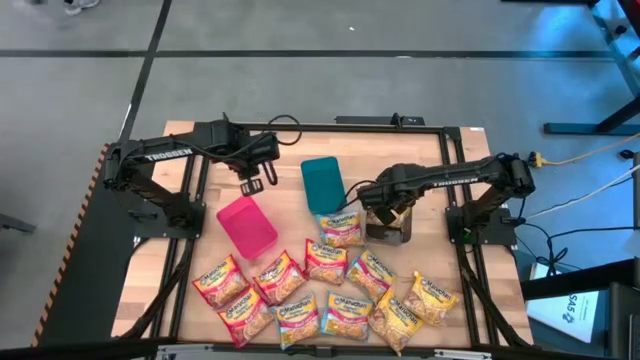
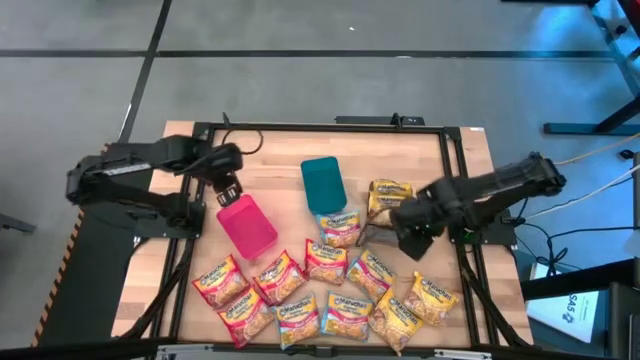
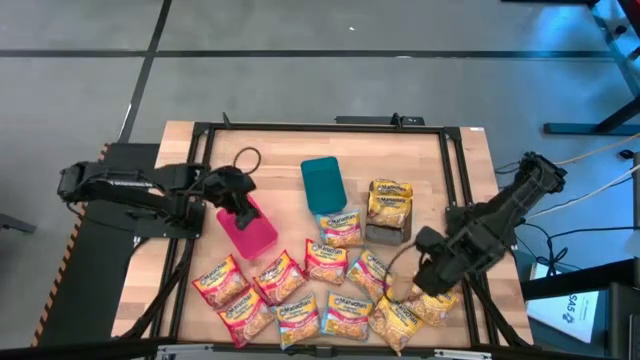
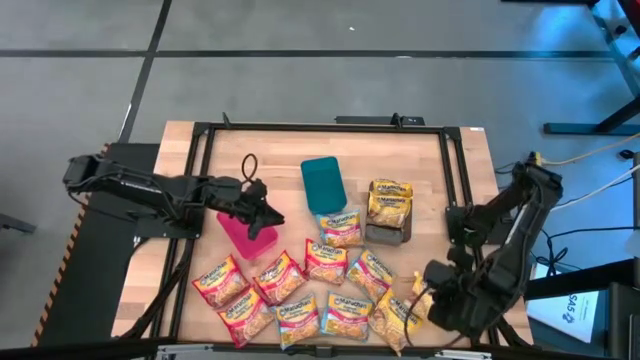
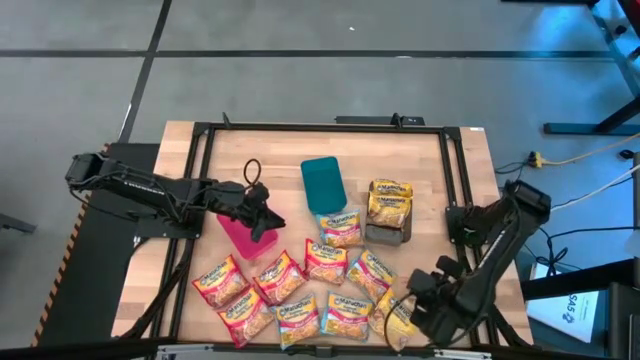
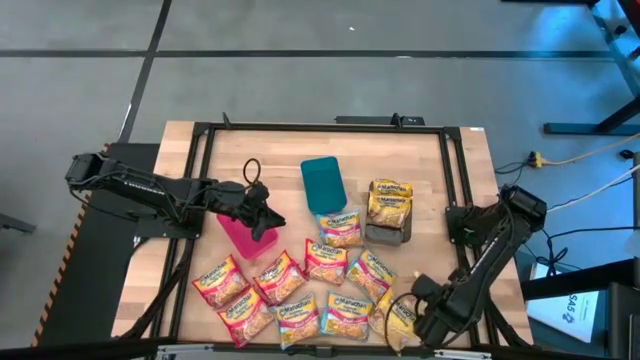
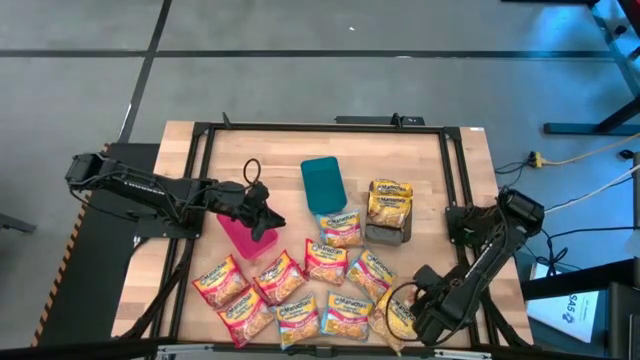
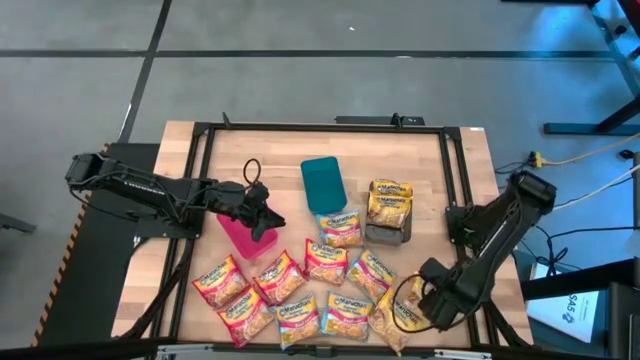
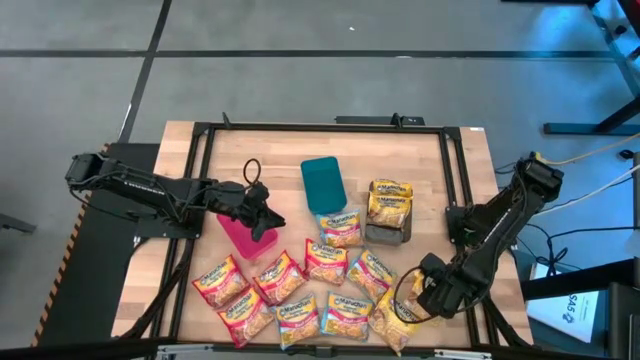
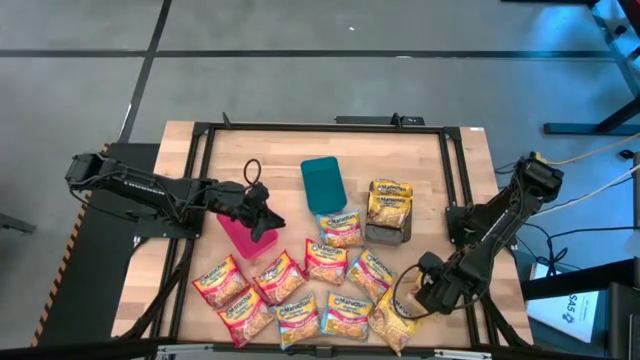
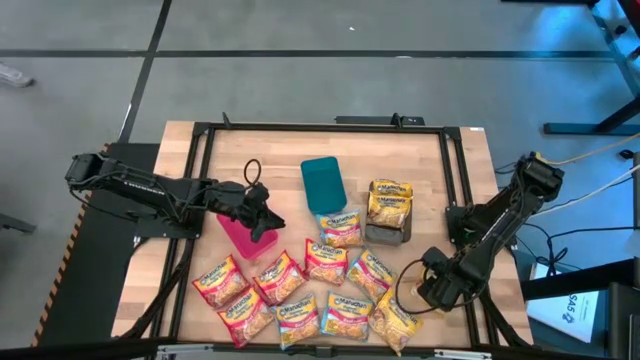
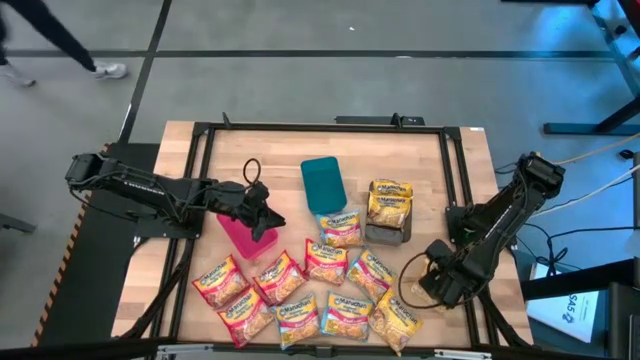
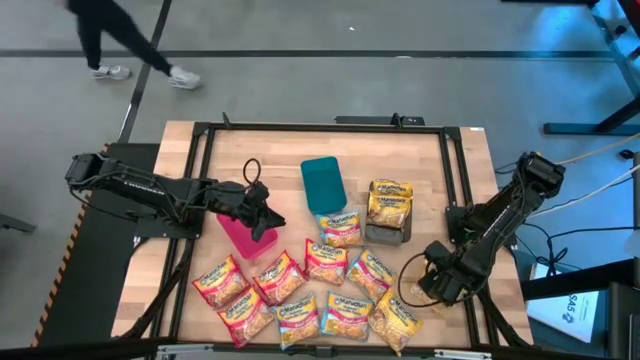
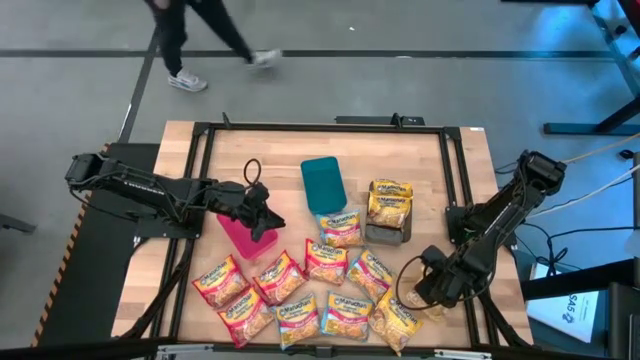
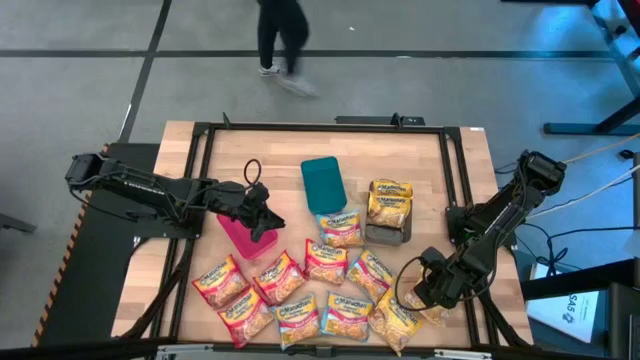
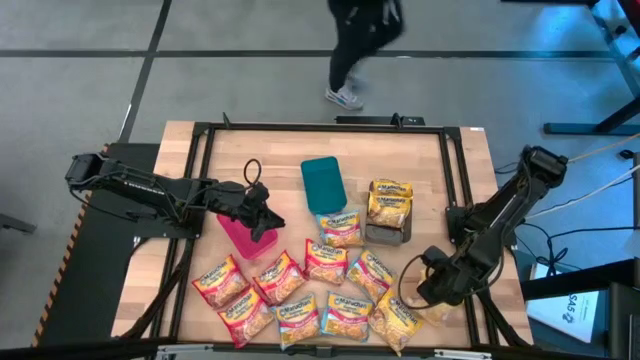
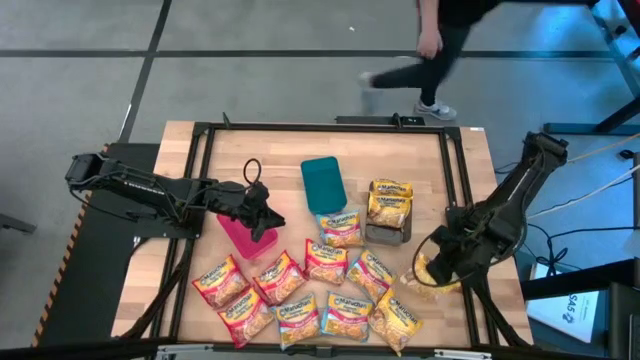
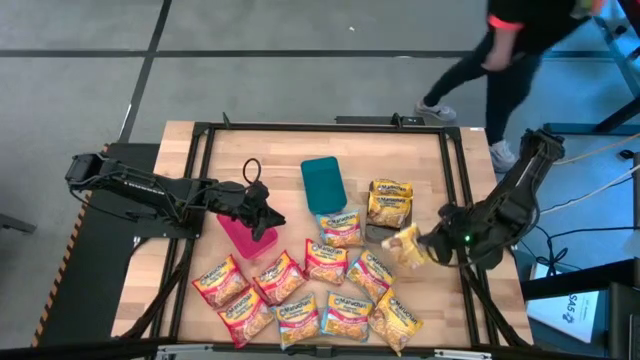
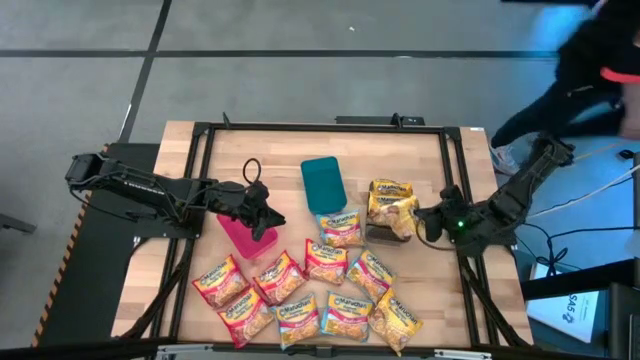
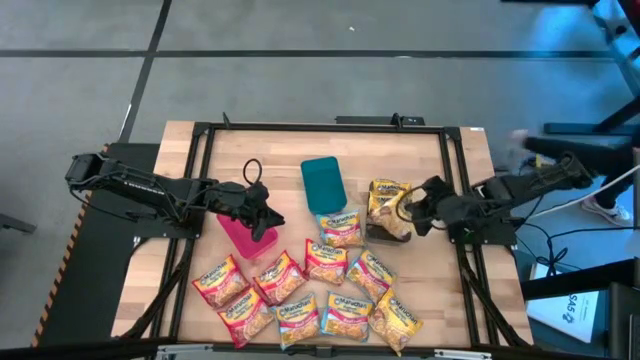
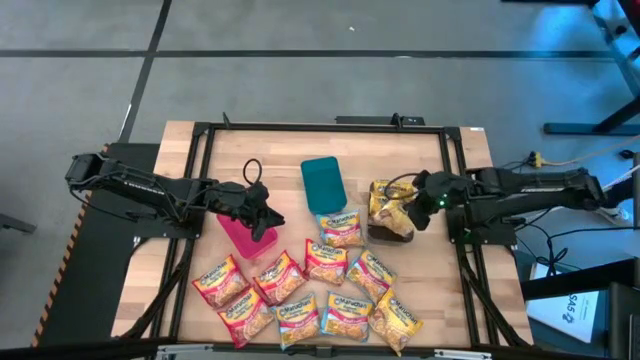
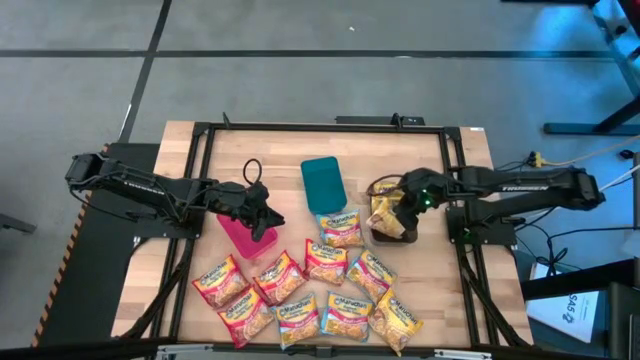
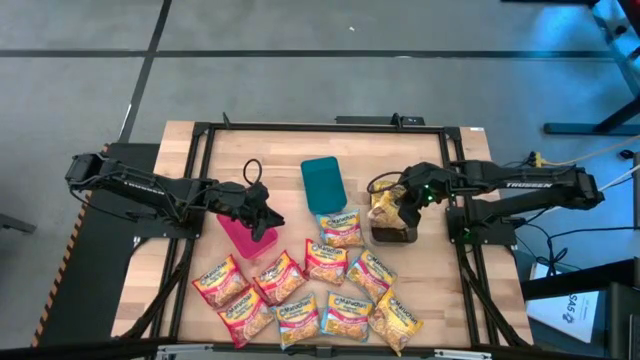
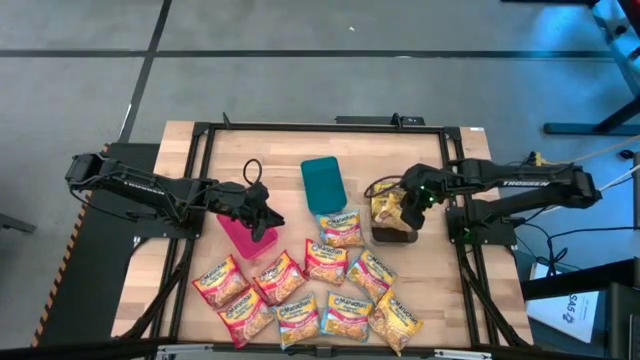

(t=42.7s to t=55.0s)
Task: Sort Maruchan noodles
Put the yellow noodle pack into the black bin

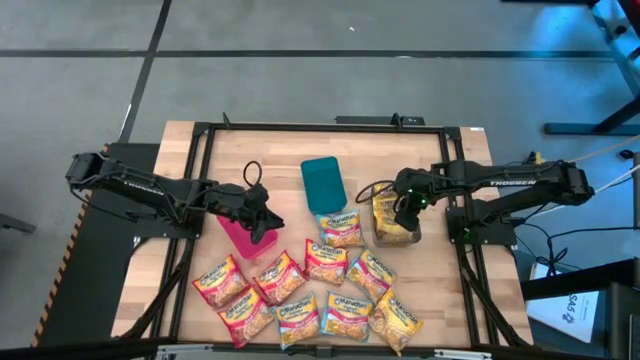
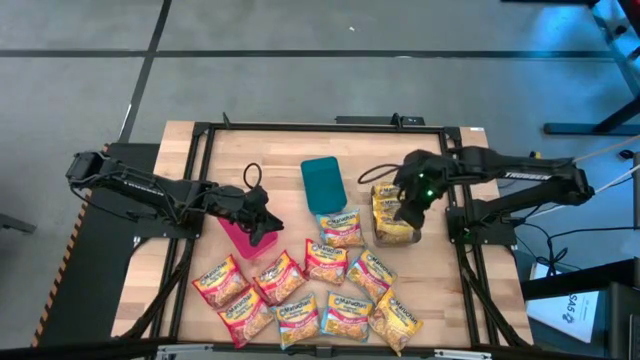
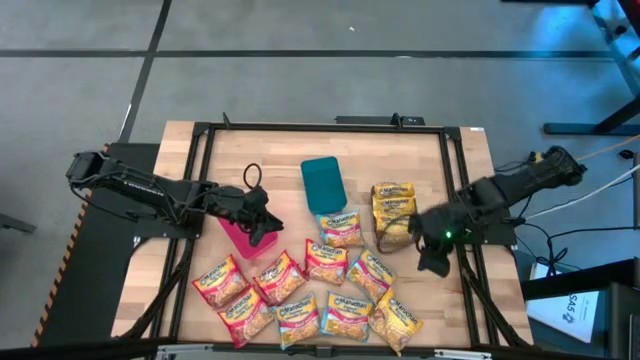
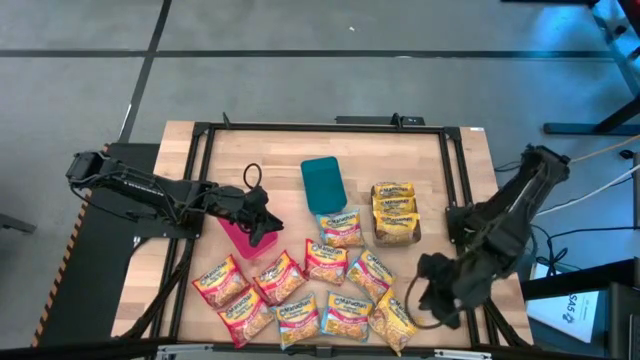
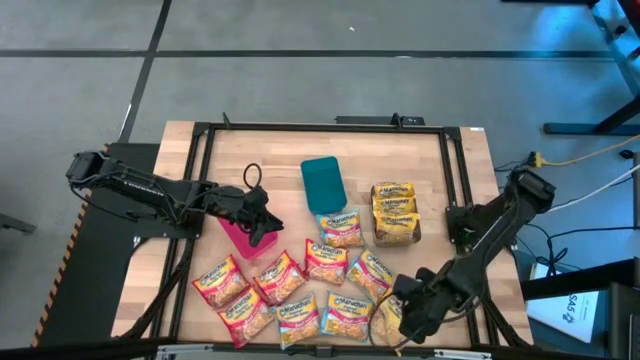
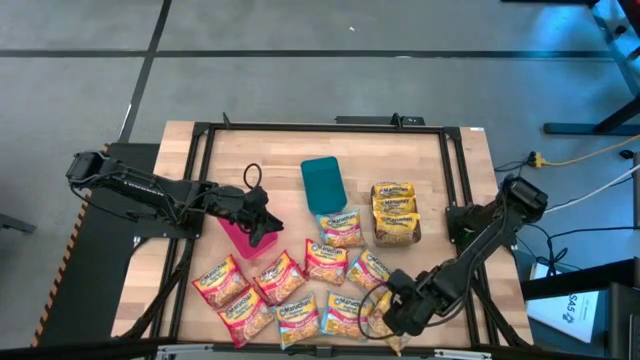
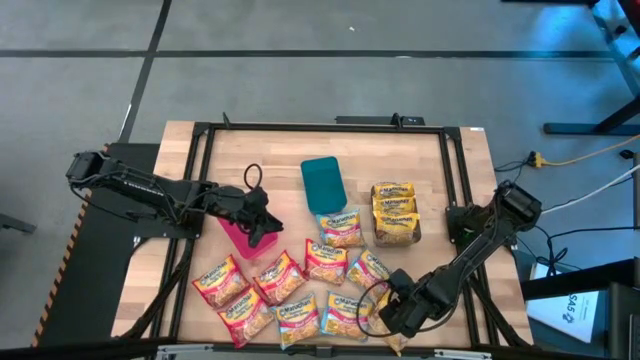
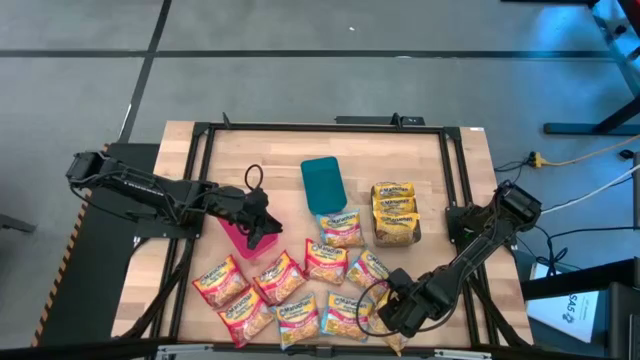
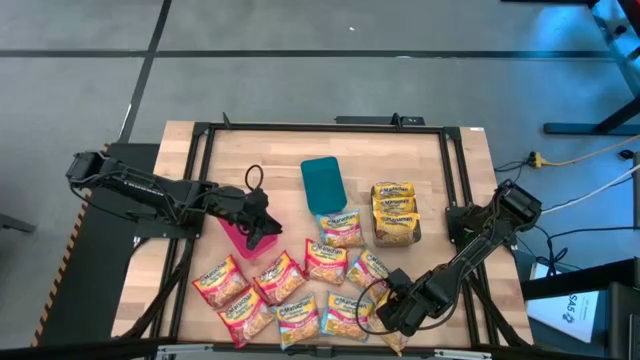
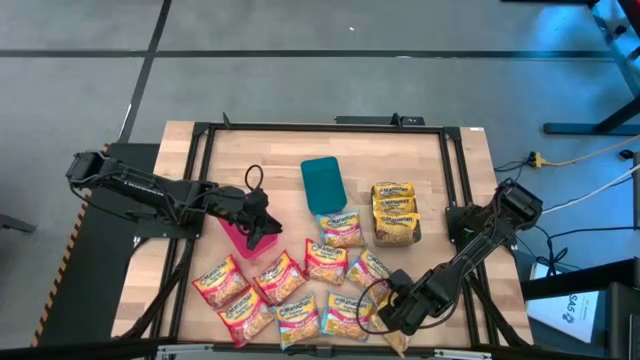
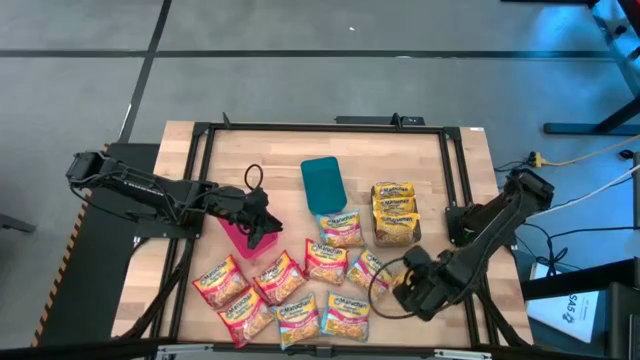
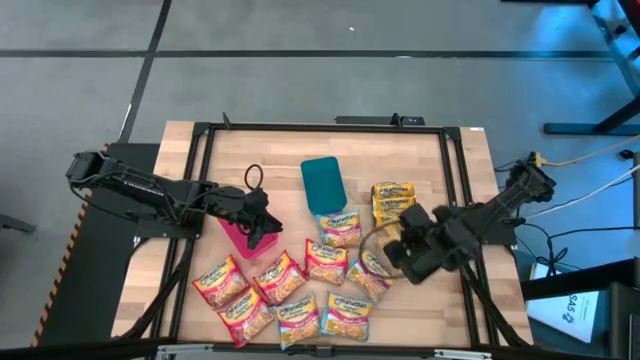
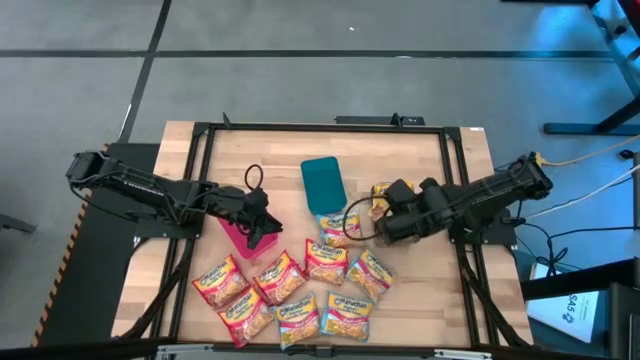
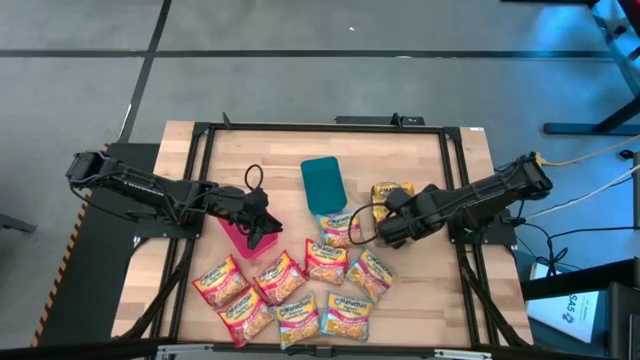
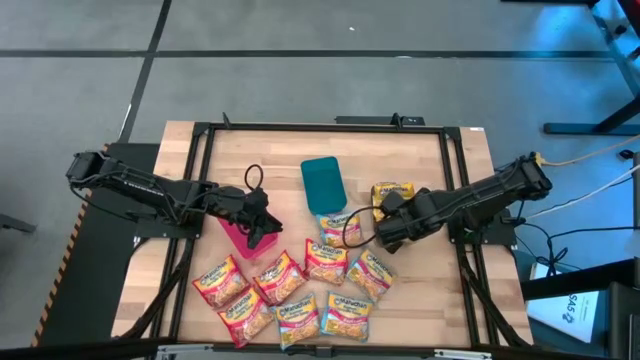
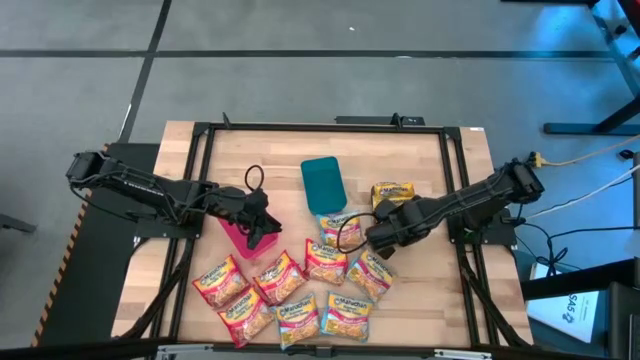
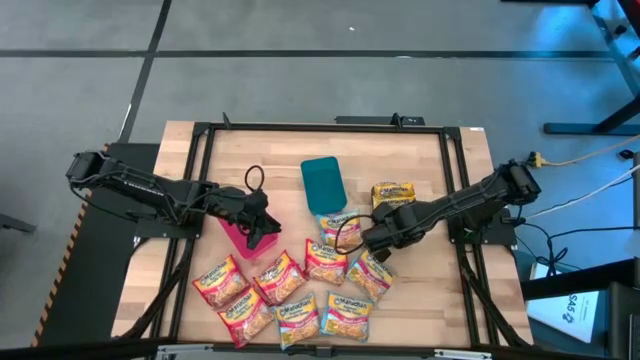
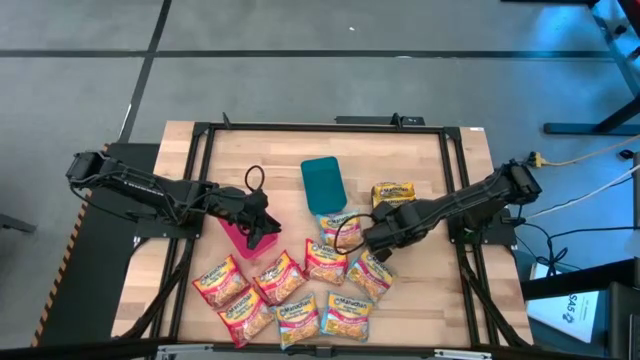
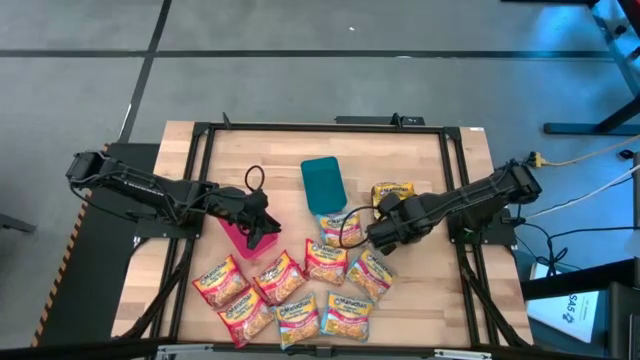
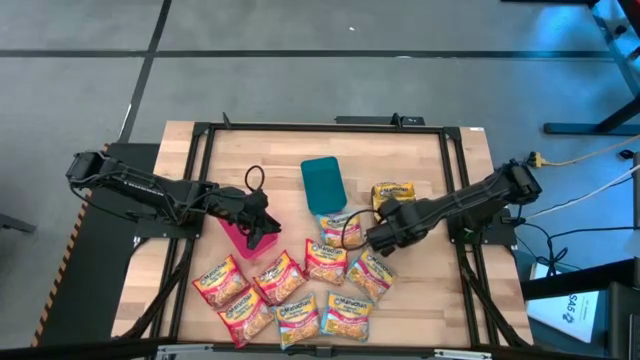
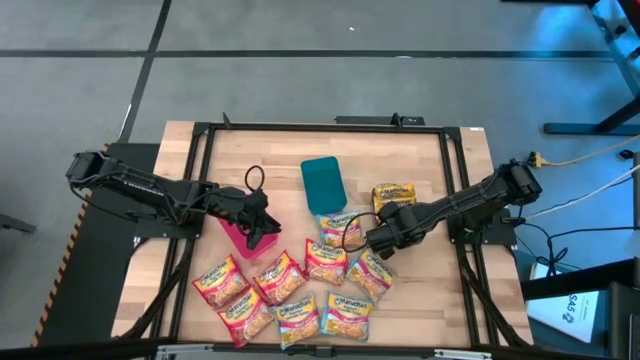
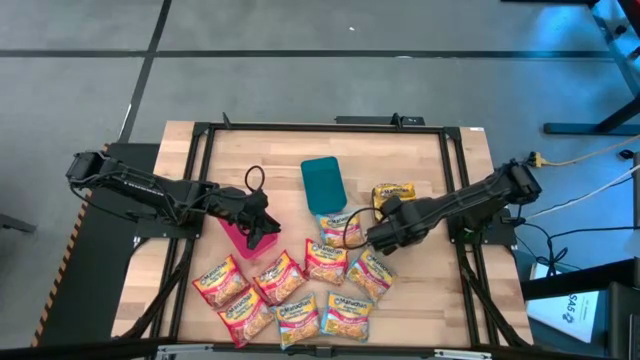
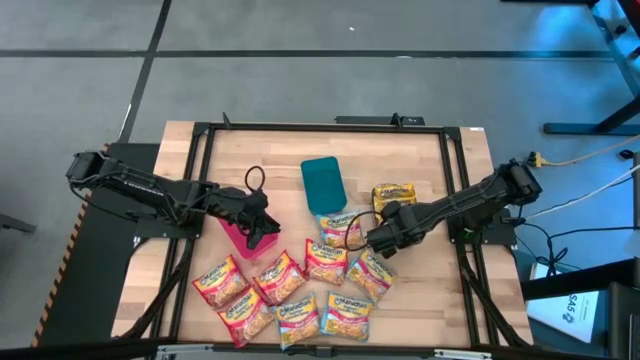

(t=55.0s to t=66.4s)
Put the yellow noodle pack into the black bin
